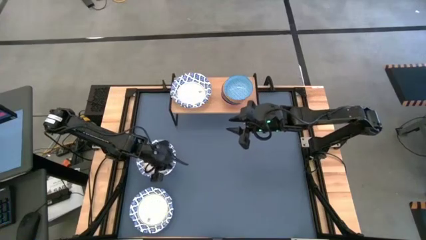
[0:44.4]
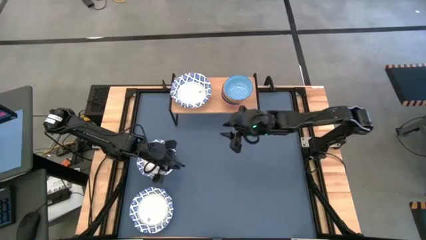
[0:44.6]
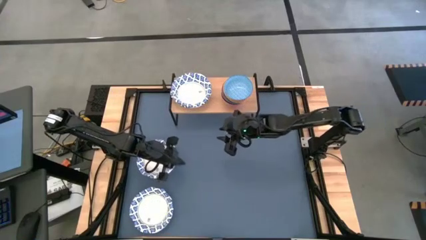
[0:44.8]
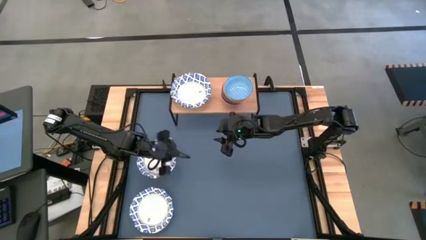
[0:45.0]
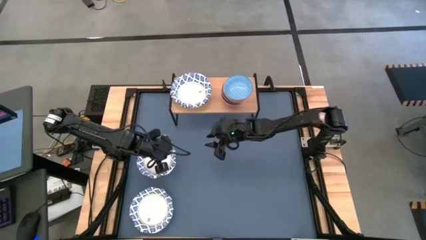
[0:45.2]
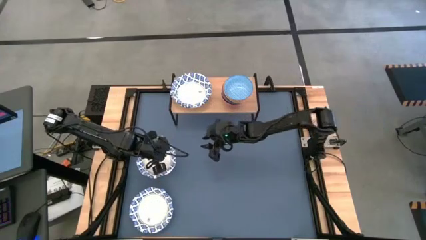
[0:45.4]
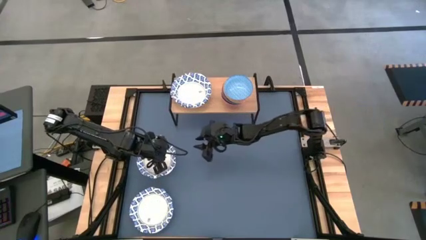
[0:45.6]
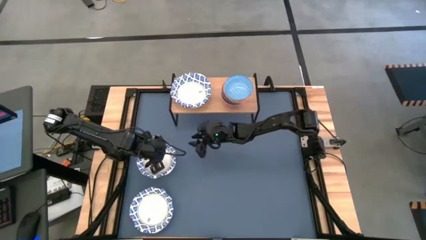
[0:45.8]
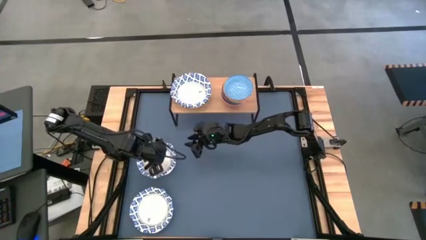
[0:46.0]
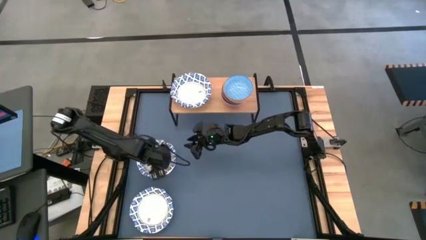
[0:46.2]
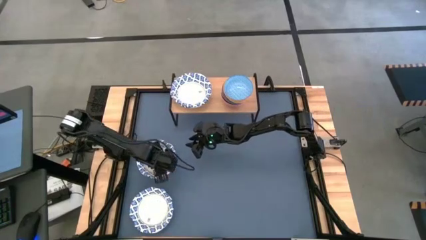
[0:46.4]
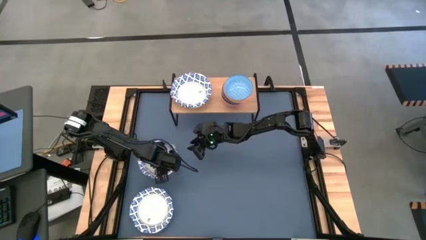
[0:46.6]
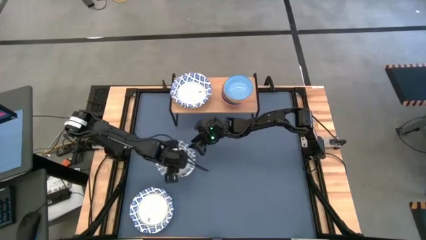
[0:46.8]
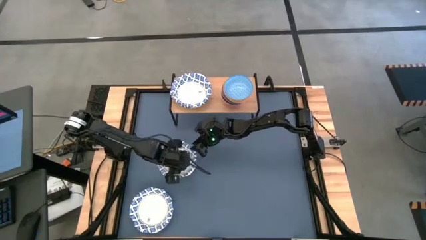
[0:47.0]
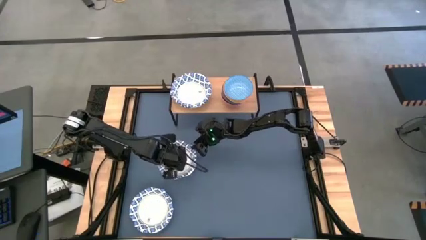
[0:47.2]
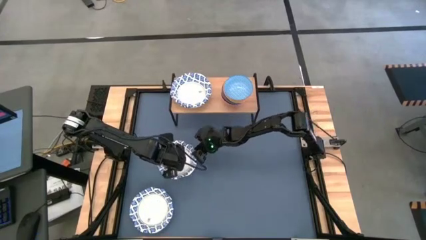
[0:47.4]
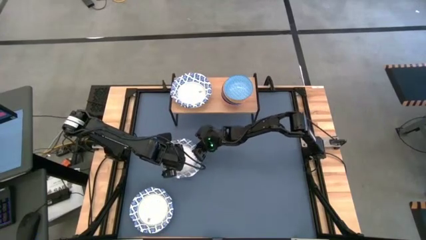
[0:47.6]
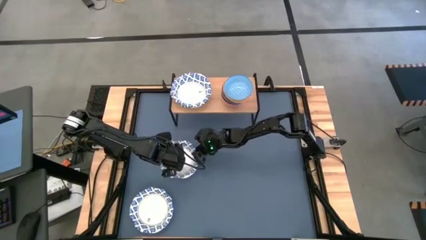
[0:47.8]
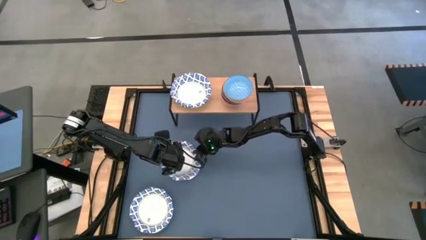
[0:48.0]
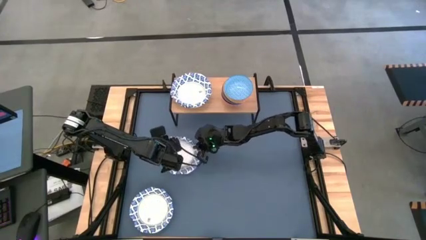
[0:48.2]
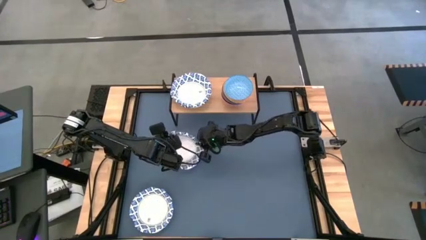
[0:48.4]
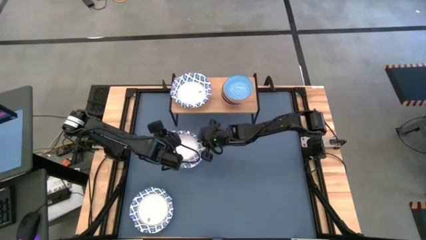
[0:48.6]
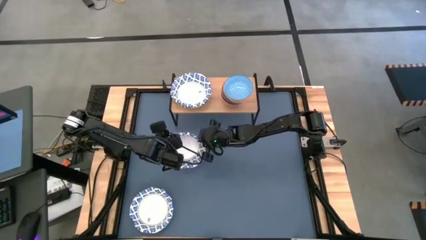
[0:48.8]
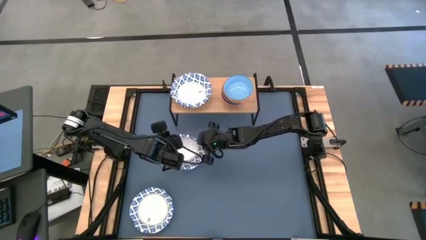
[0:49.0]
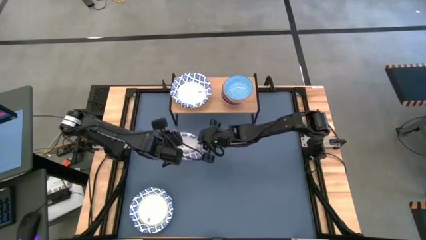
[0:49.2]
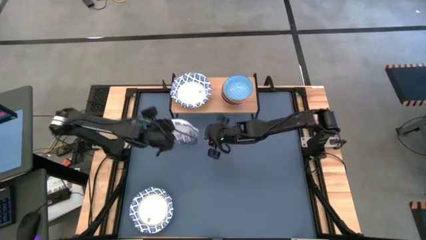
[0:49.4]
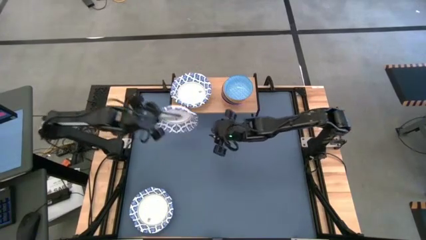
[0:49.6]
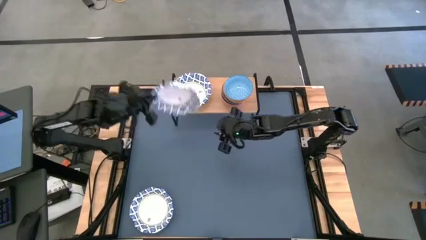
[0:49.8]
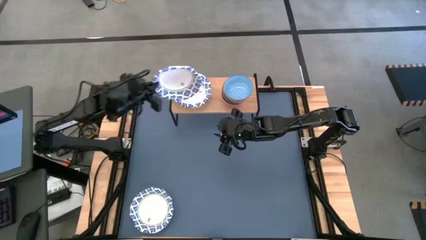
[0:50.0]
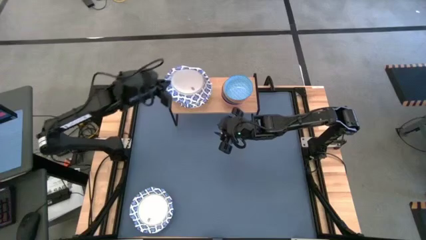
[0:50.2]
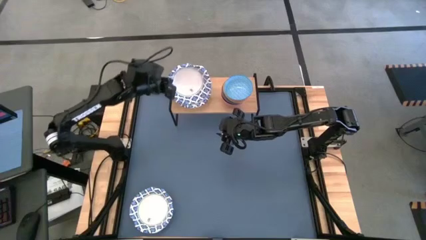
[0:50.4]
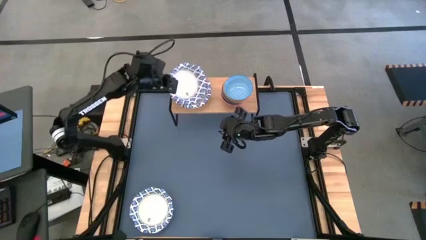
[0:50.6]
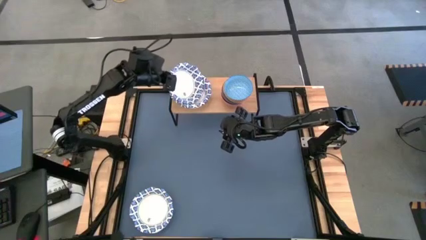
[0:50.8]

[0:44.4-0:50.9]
Task: Place and stack bowls onto a shelf
Stack the top white patterned bowl on top of the white patterned bowl on the shelf

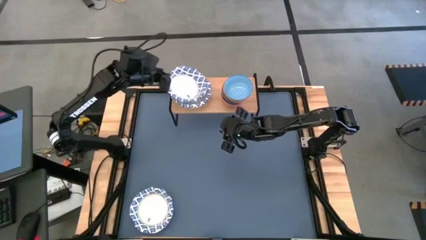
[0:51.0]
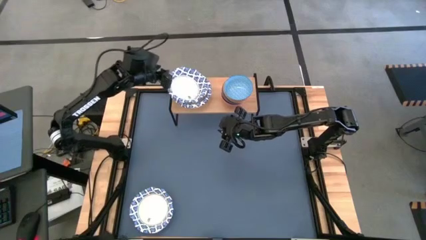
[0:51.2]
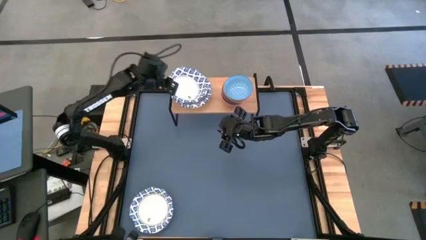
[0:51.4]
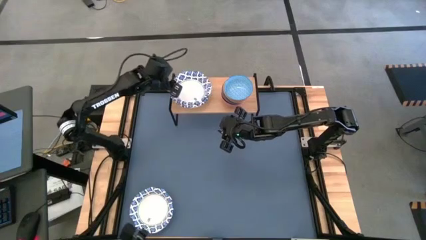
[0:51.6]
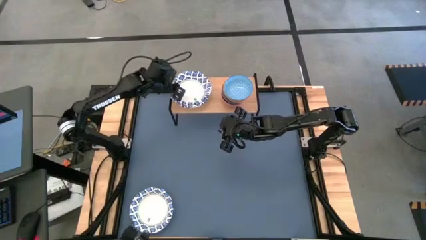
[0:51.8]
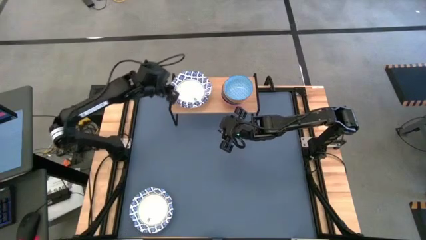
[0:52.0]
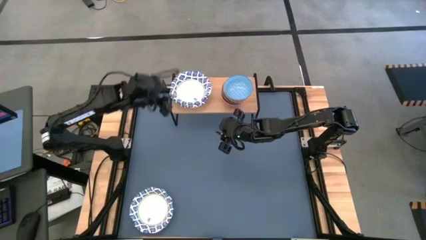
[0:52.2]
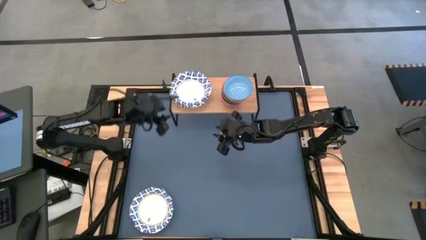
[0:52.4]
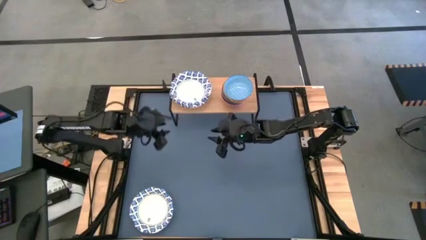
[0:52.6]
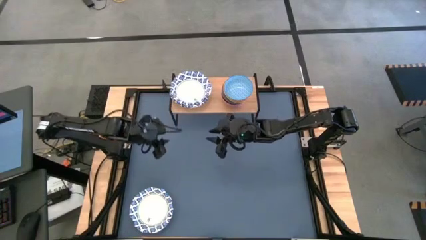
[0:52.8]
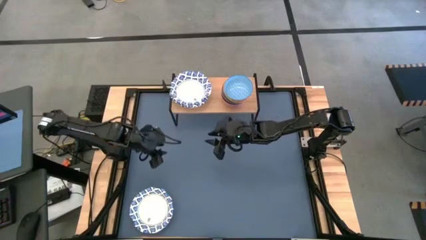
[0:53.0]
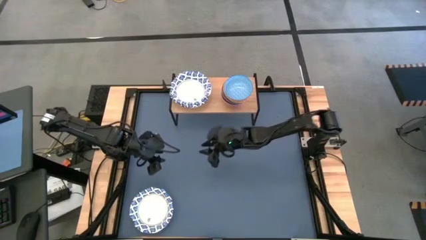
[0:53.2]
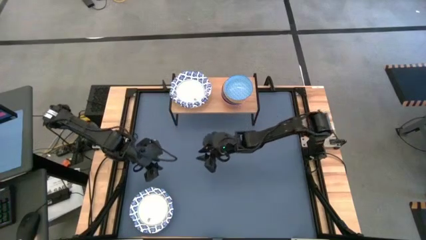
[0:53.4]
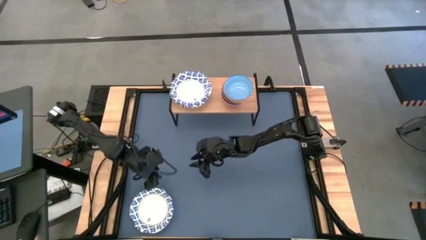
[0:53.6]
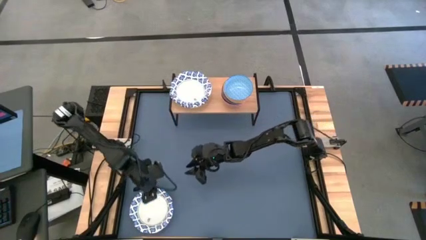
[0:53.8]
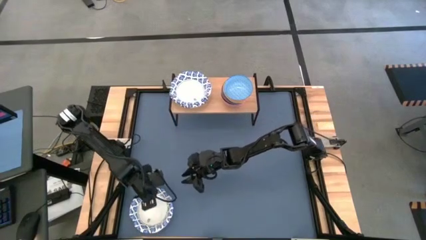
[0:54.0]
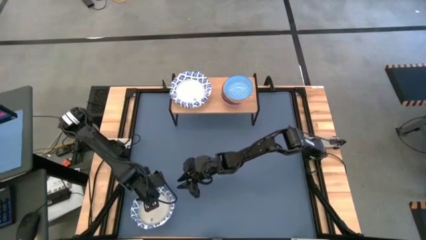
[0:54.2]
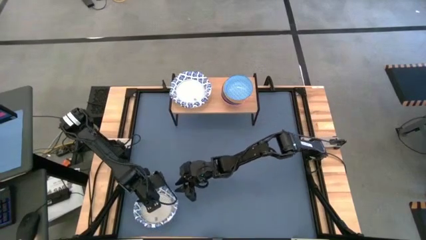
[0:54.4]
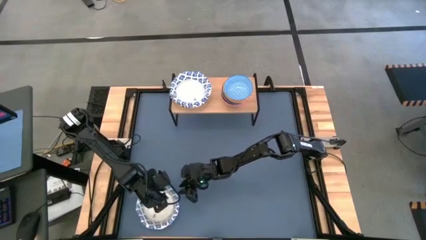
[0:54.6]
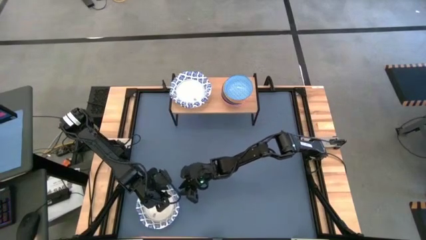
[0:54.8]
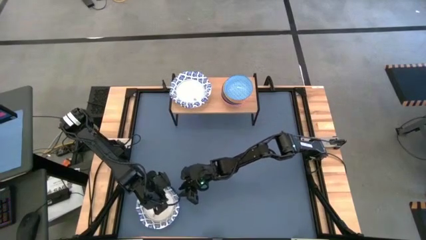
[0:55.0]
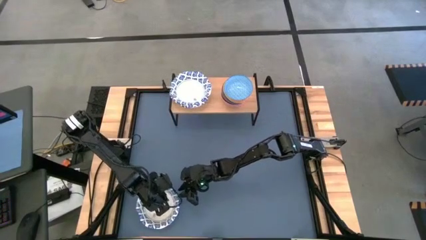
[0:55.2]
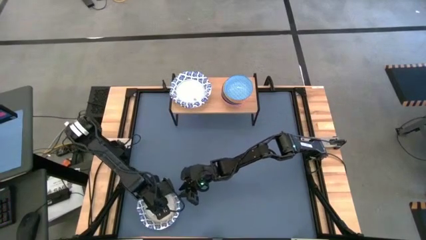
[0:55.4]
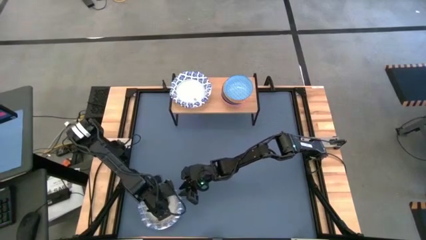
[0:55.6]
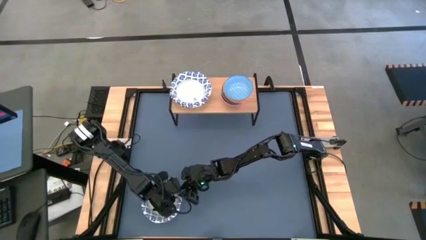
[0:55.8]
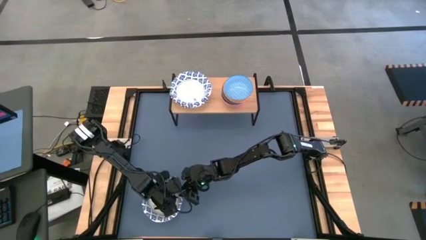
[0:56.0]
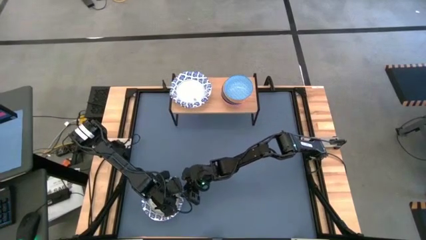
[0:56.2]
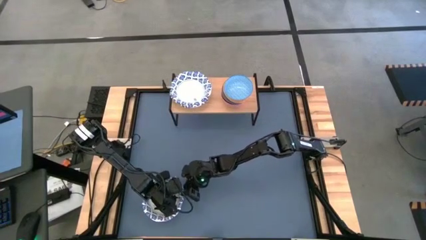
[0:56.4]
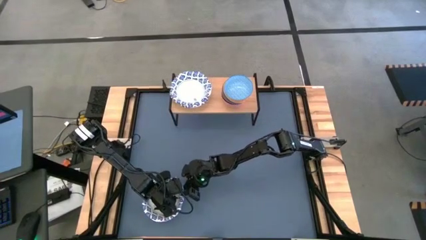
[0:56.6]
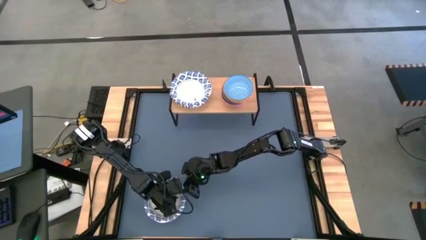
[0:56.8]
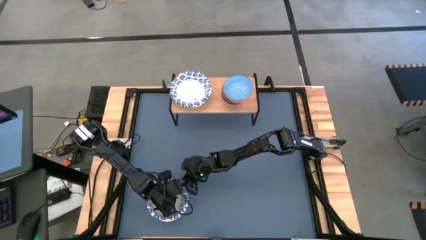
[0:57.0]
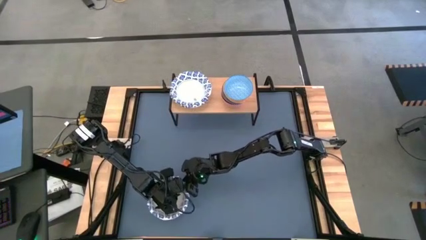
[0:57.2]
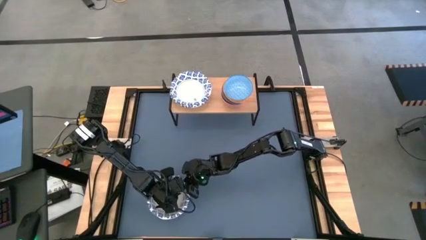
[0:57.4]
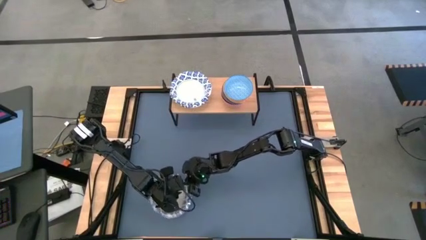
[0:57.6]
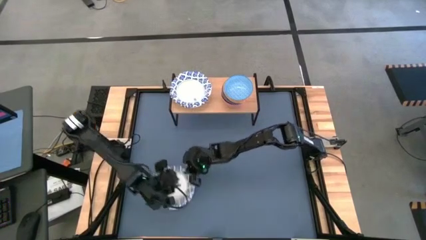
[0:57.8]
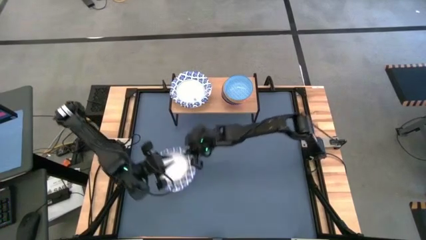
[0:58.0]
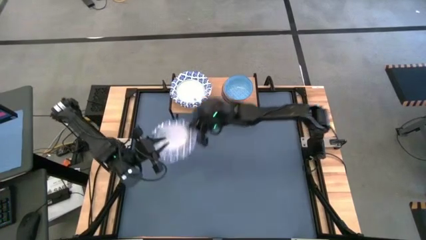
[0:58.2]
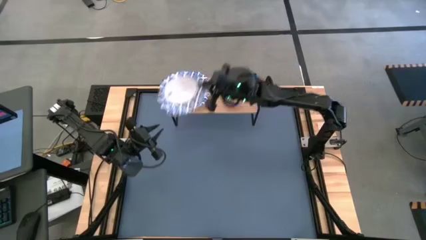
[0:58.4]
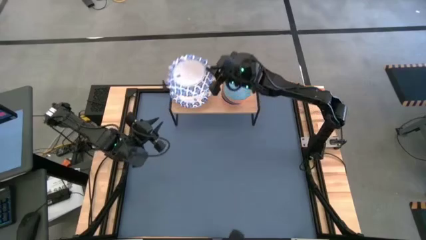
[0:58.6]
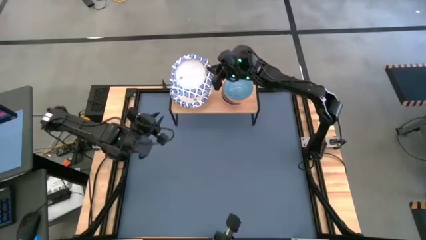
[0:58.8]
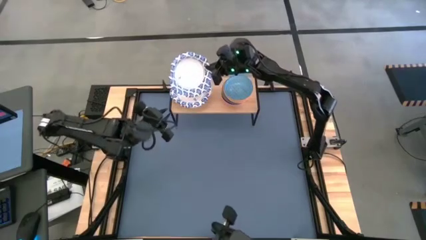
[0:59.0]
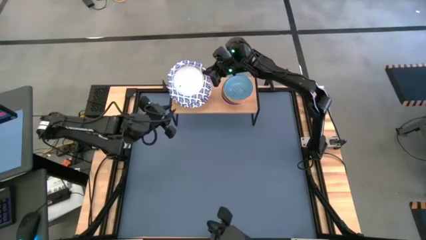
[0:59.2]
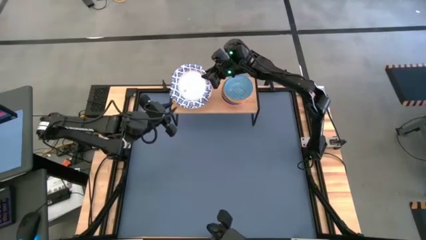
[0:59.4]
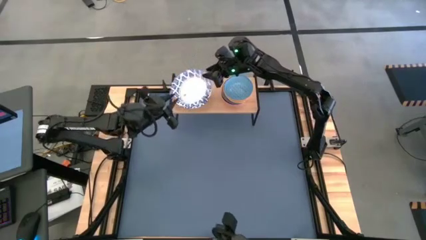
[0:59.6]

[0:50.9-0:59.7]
Stack the white patterned bowl on top of the white patterned bowl on the shelf

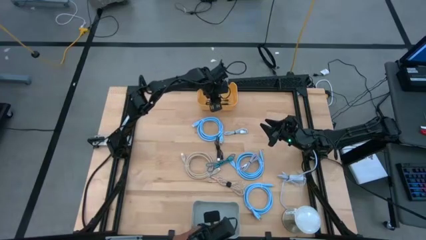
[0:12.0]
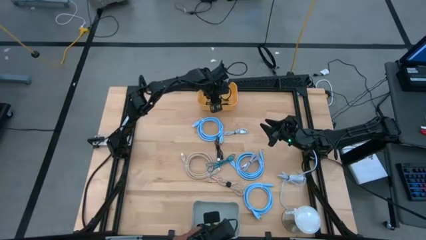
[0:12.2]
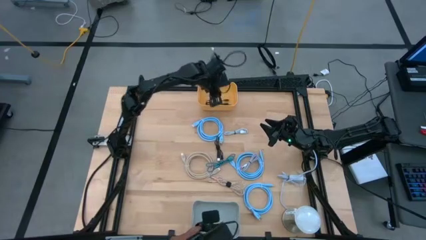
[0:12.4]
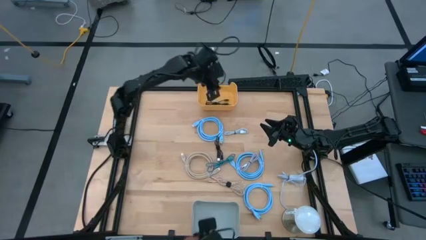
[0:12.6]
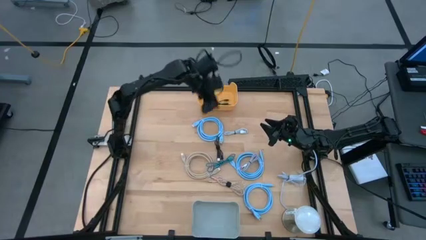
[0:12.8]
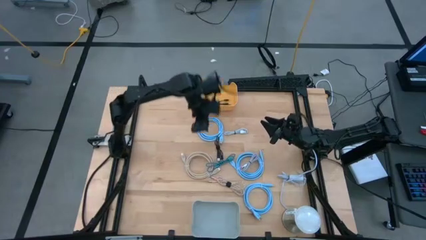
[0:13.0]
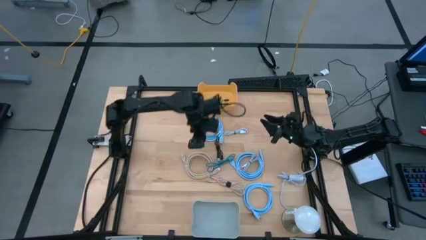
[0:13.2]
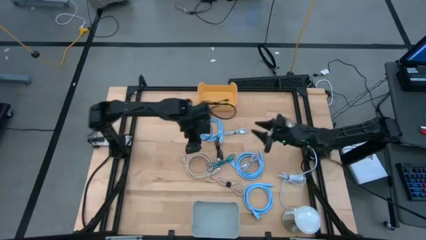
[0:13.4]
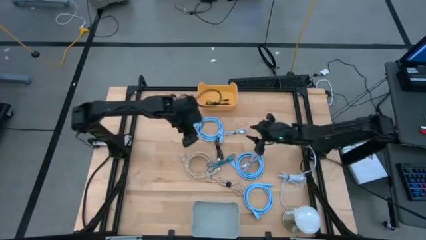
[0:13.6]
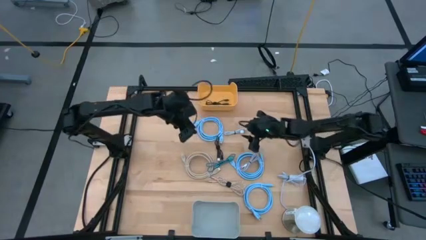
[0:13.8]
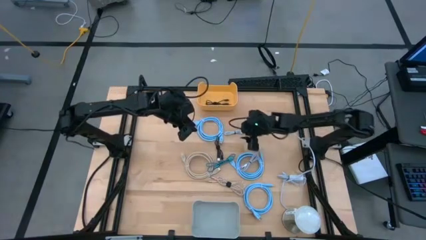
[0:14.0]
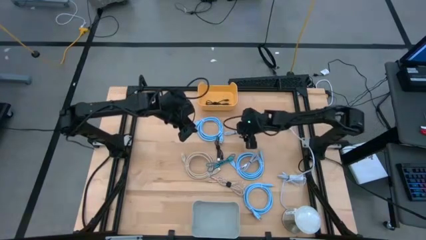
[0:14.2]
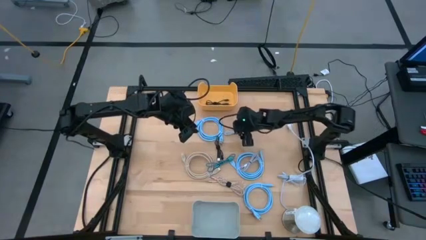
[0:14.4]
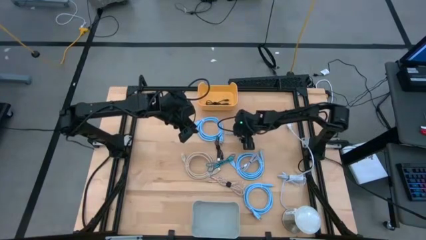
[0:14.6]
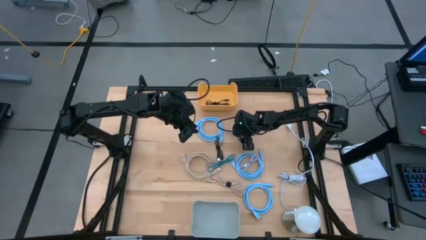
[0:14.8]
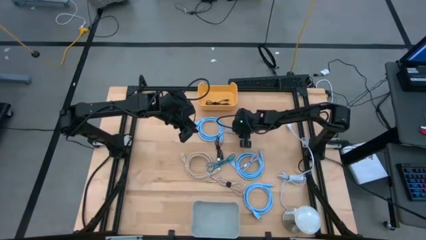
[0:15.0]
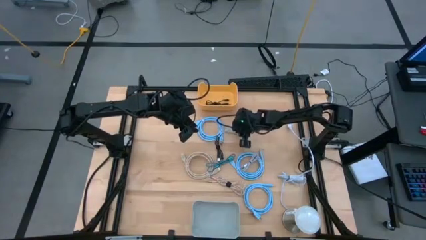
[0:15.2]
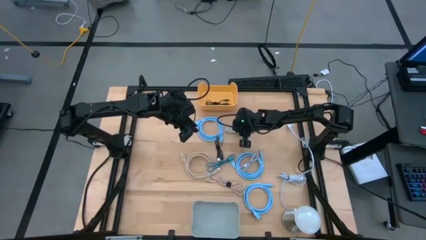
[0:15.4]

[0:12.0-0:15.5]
Task: Sort cables into bins
Put the white charger cable into the yellow bin
